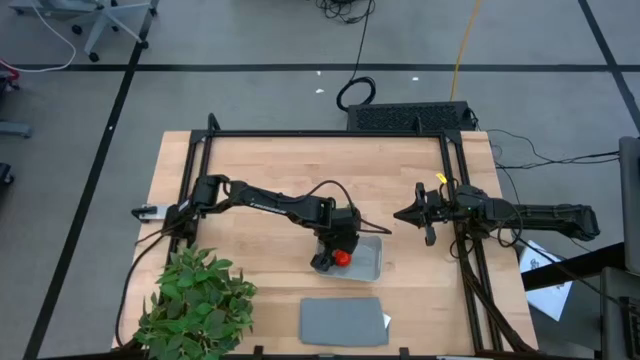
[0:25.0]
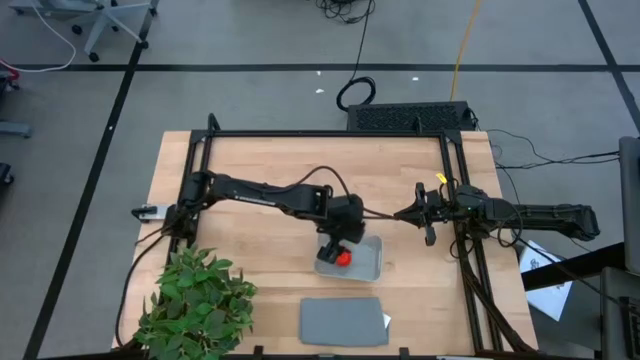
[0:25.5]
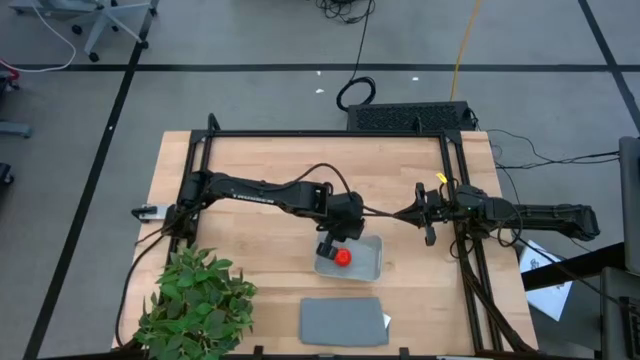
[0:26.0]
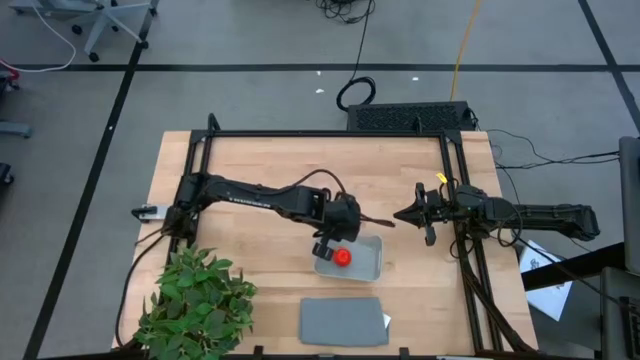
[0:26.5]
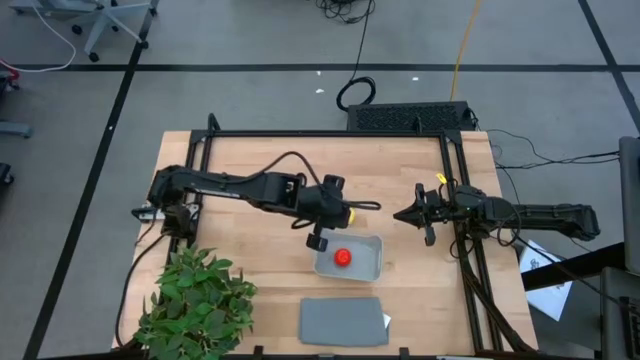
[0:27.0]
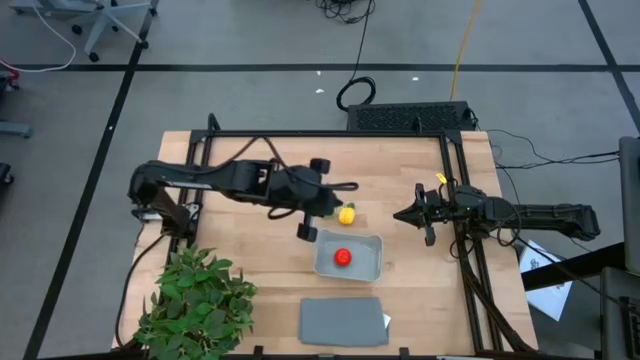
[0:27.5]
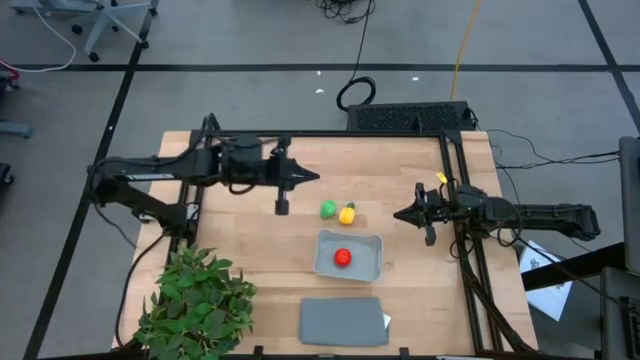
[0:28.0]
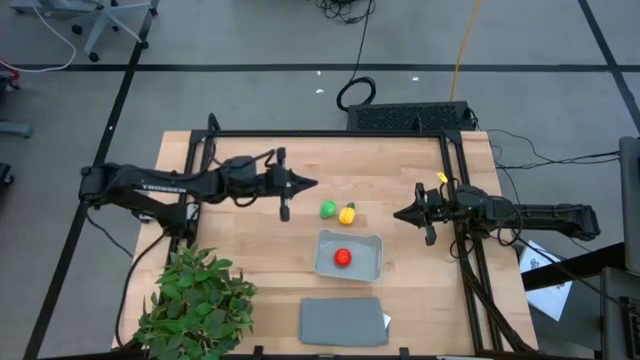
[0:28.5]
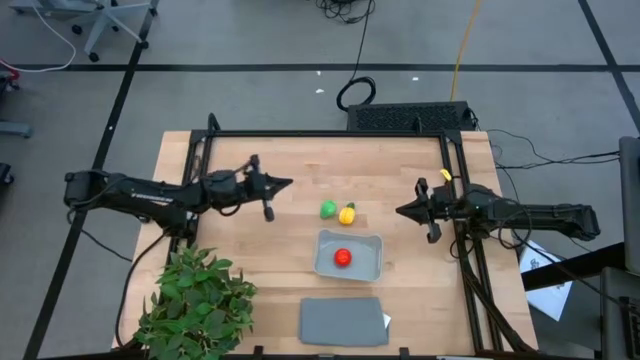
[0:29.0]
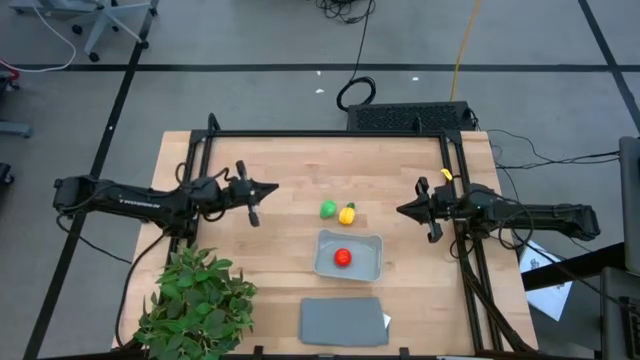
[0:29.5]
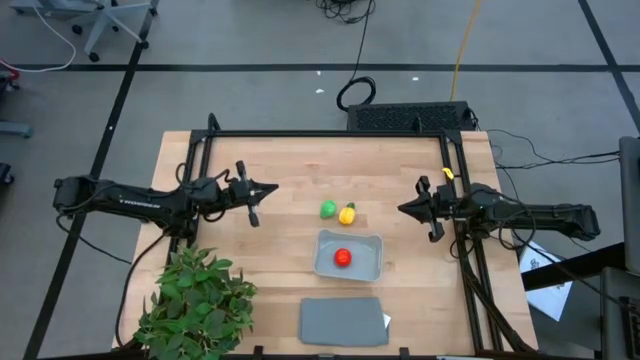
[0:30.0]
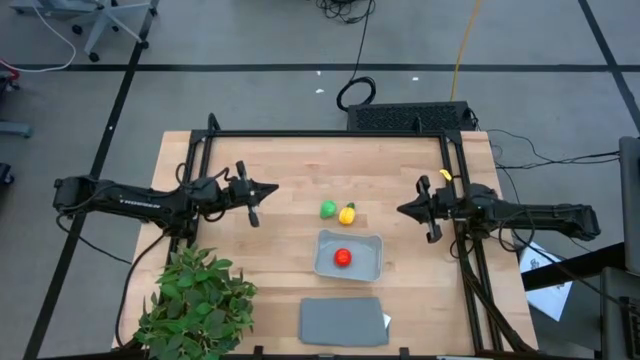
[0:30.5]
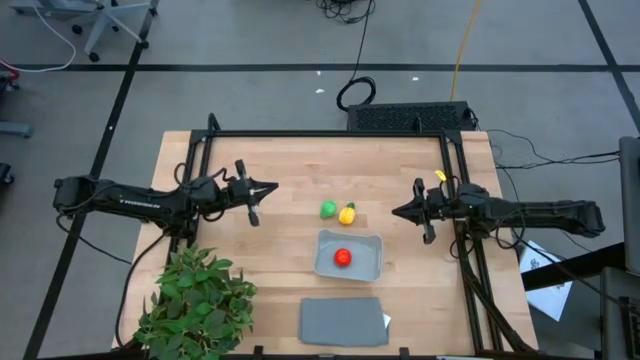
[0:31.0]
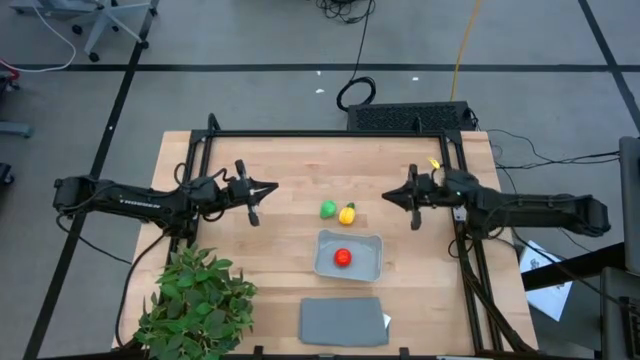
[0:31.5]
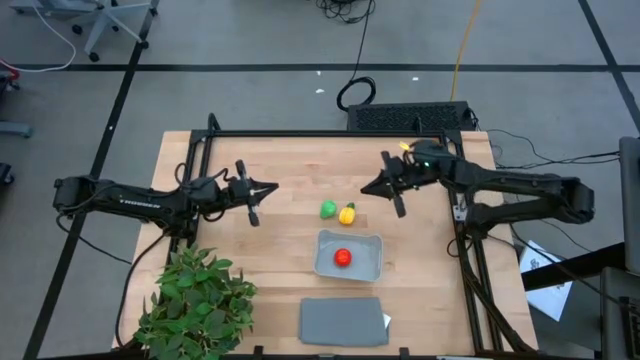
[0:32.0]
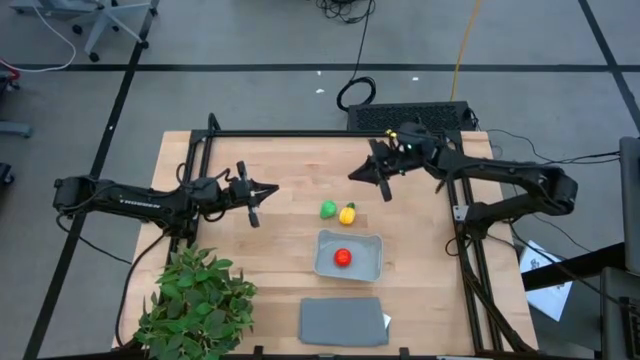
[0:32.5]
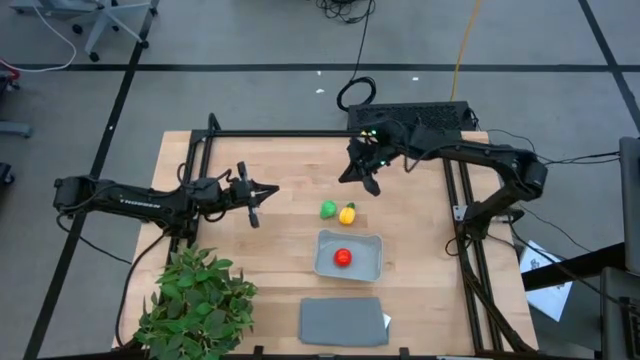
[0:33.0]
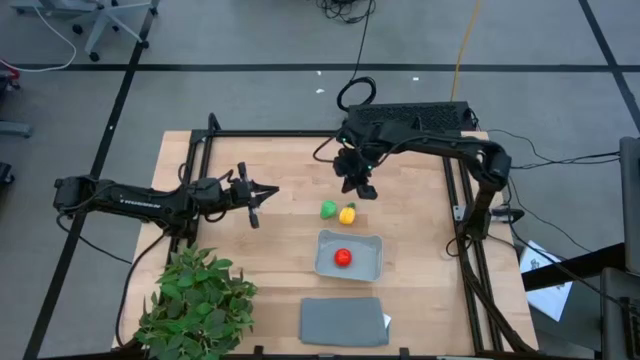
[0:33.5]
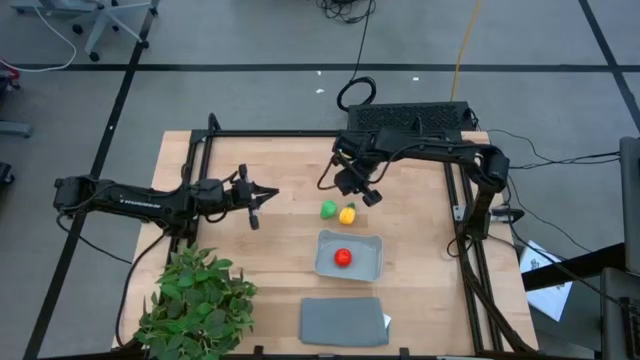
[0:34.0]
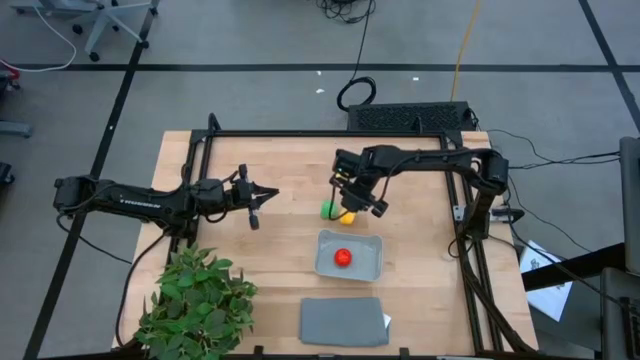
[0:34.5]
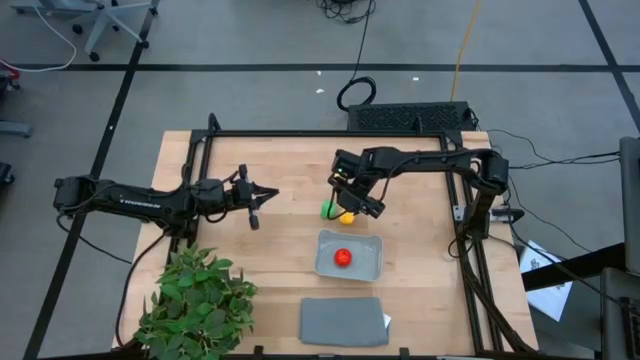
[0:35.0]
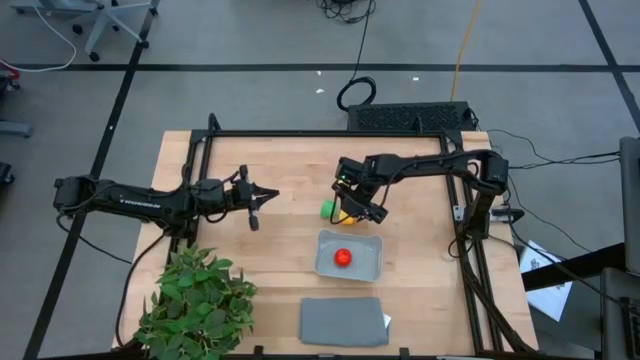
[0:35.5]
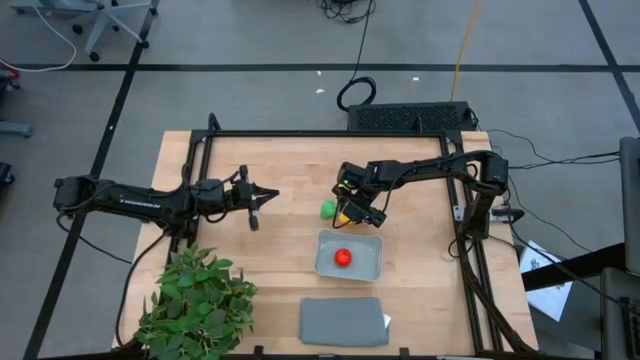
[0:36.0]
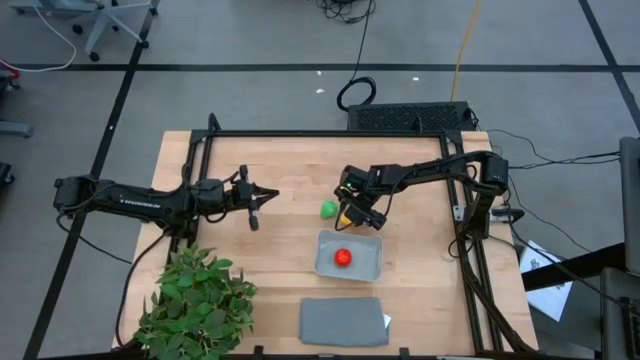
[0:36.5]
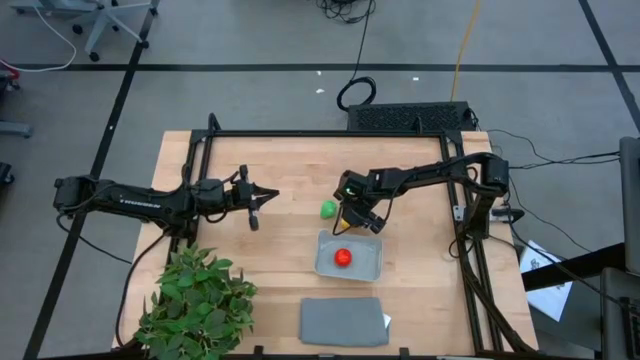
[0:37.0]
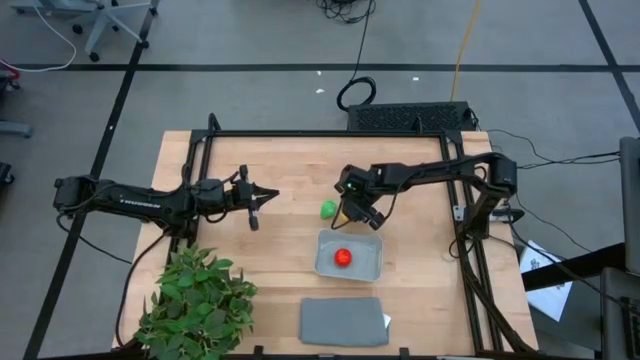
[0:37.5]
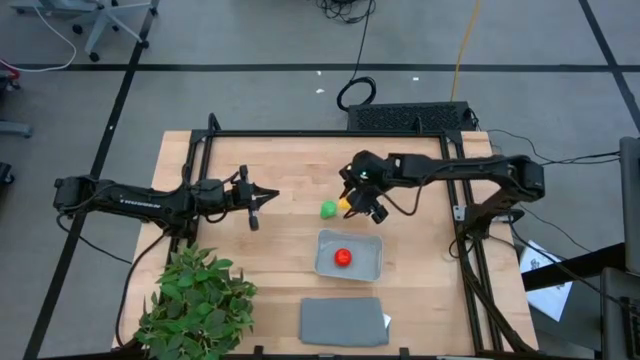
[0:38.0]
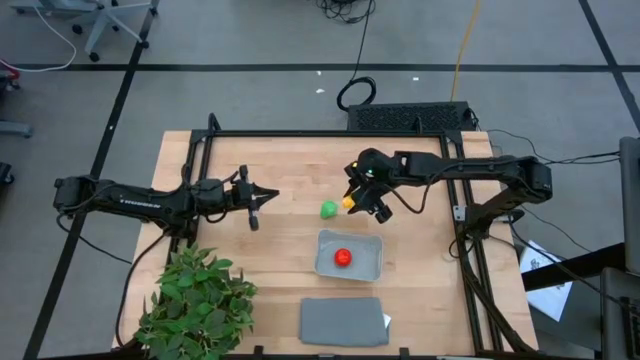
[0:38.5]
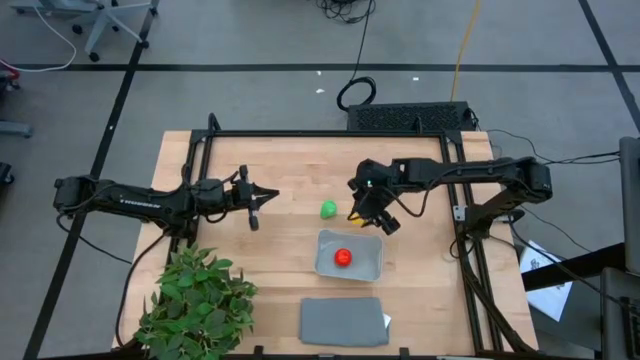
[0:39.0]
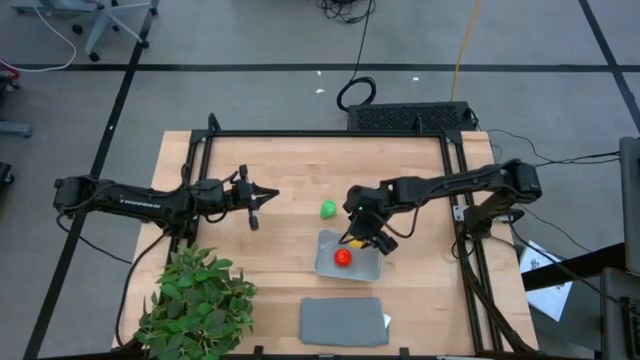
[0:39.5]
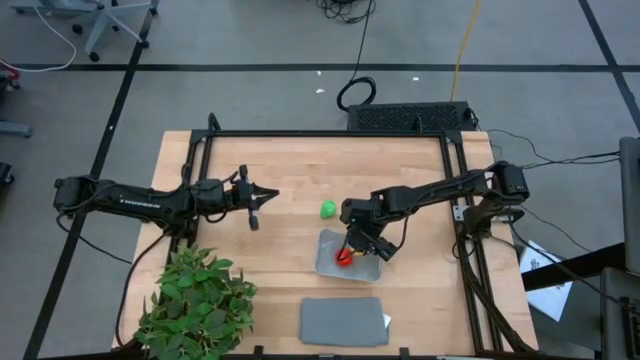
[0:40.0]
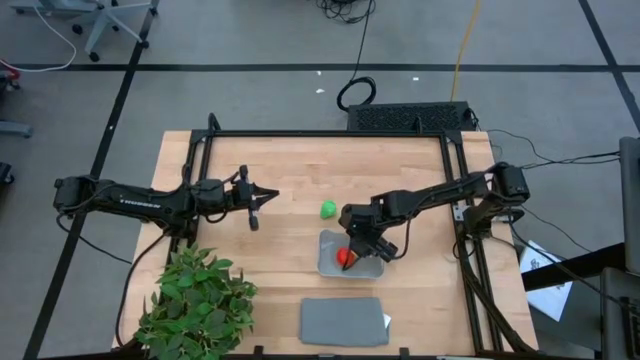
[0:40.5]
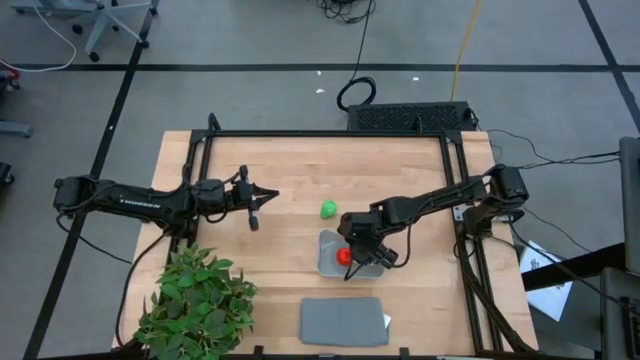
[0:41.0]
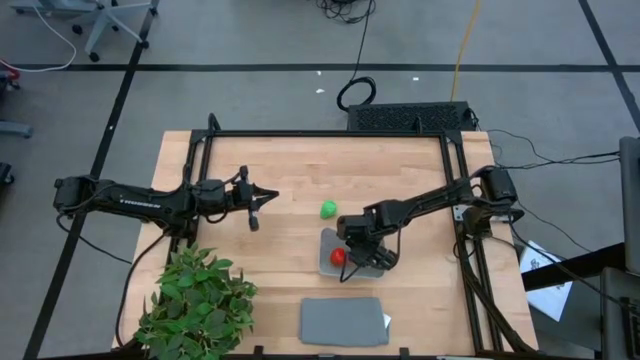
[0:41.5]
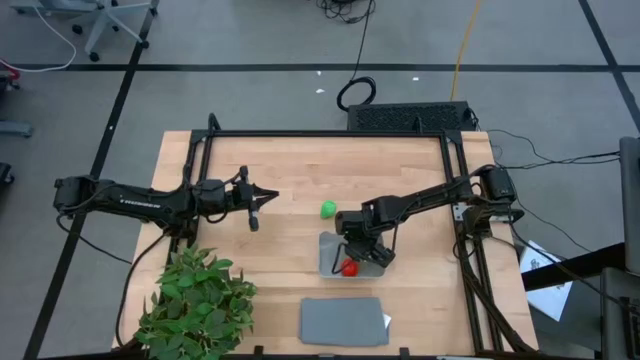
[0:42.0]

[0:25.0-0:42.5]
Task: Pick and placing Produce into tupperware
Put the yellow pineapple into the gray bin

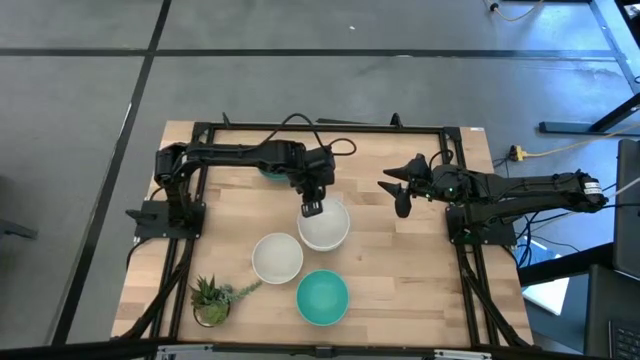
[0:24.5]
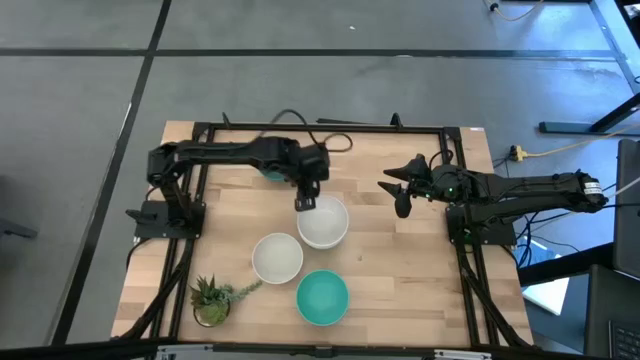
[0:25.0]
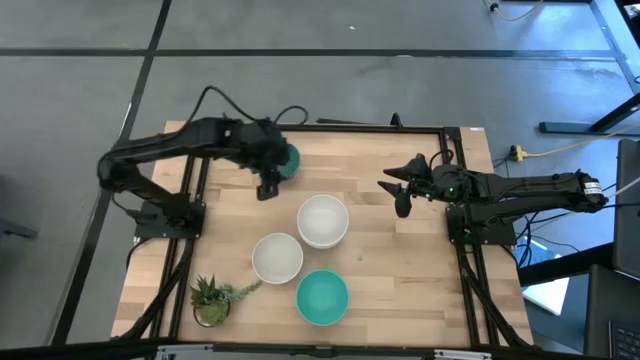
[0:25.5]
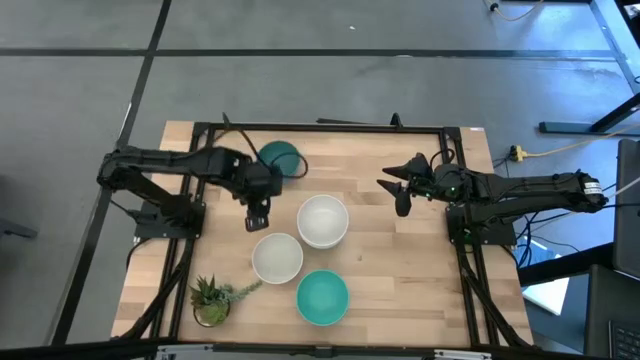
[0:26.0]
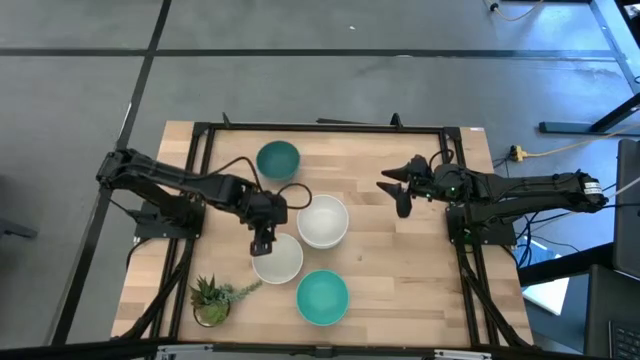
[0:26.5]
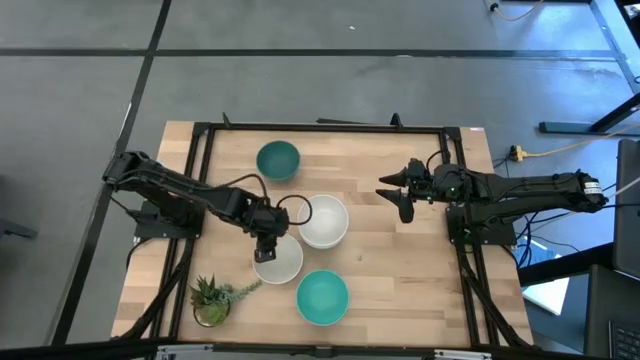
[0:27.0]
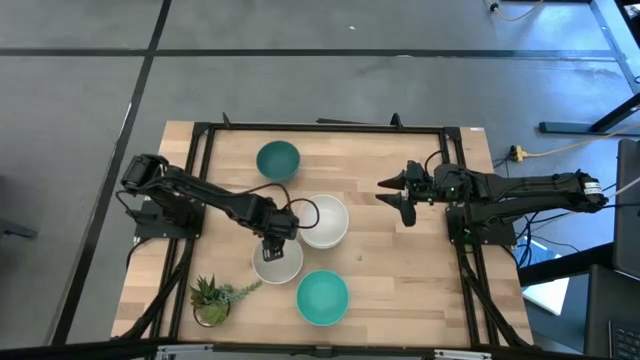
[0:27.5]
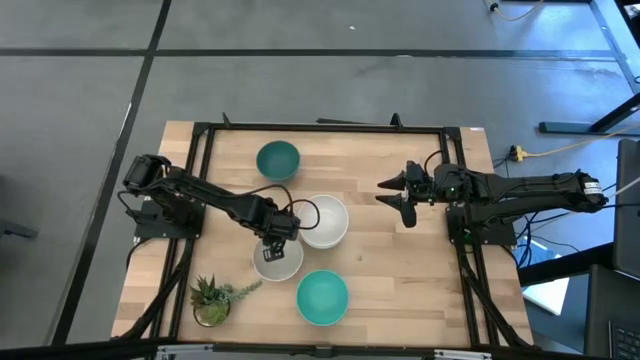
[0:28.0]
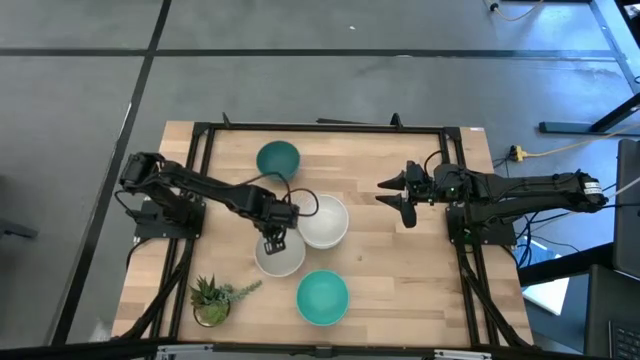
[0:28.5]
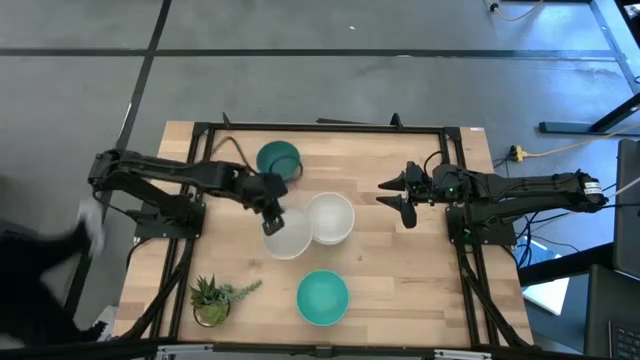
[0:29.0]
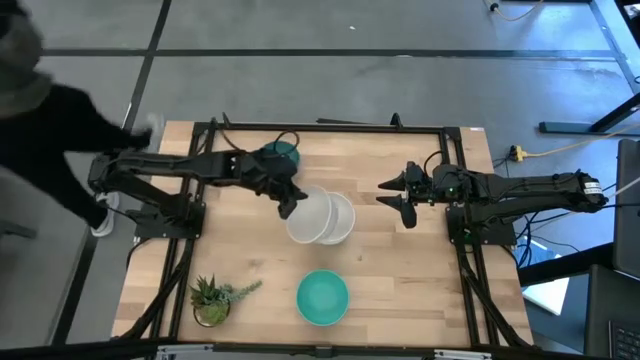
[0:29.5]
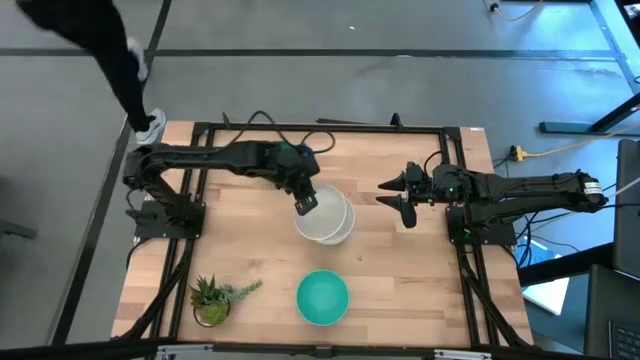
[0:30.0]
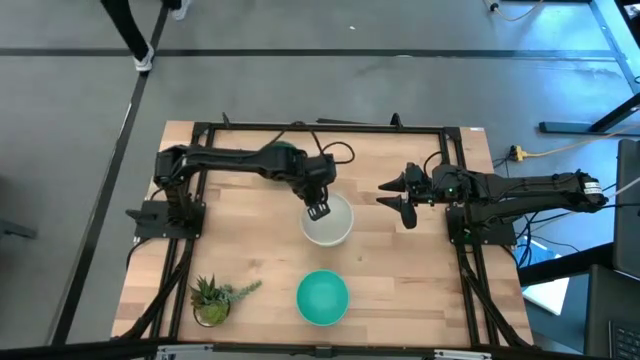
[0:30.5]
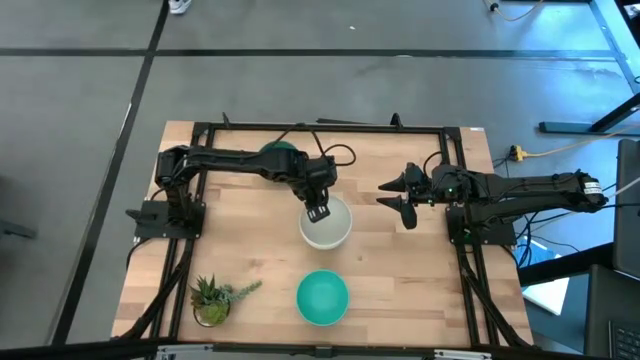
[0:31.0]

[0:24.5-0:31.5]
Task: Nest bowls inside each other
Stack the white bowl on the white bowl
